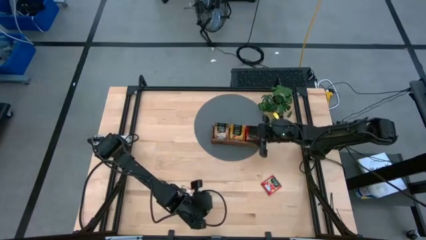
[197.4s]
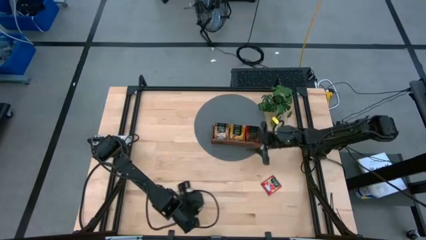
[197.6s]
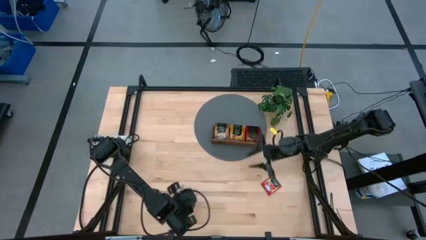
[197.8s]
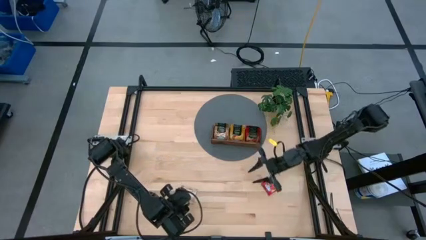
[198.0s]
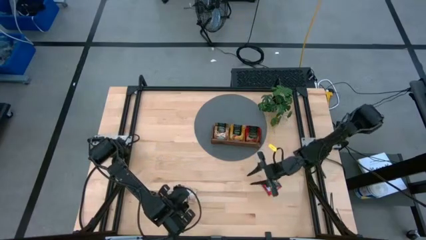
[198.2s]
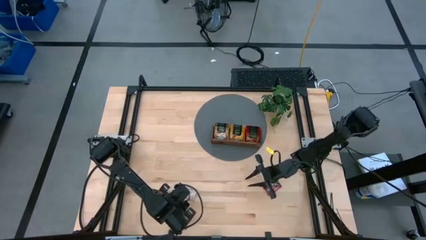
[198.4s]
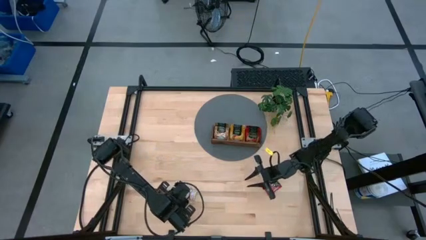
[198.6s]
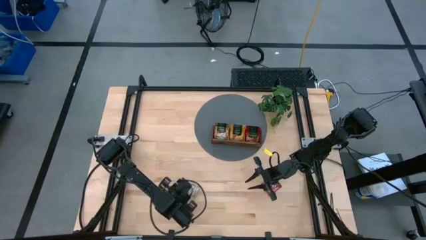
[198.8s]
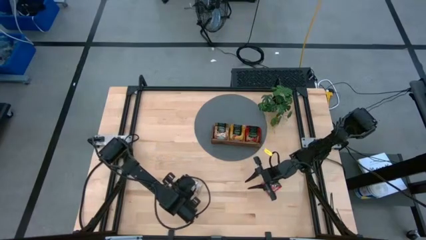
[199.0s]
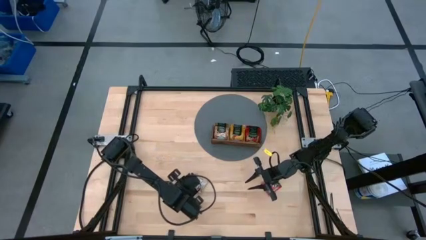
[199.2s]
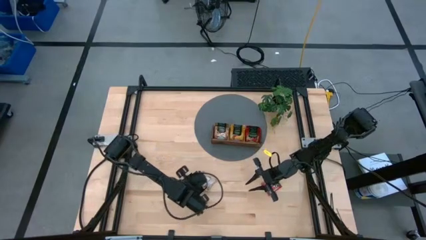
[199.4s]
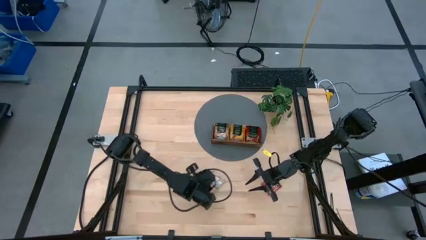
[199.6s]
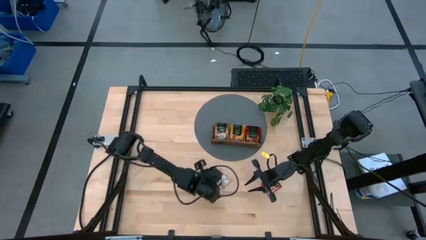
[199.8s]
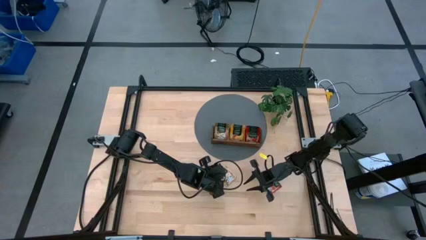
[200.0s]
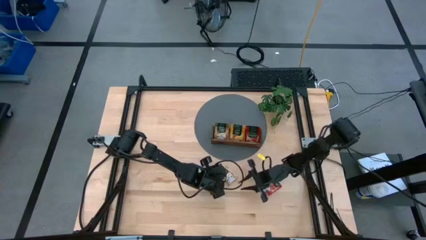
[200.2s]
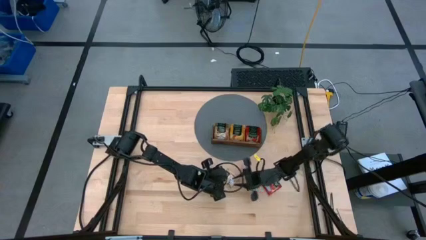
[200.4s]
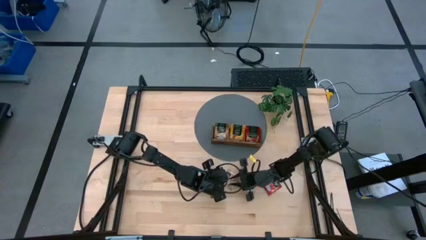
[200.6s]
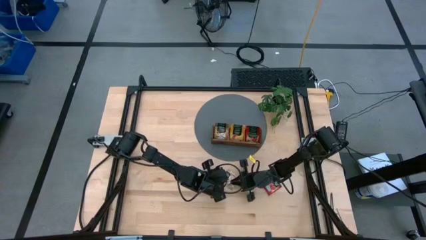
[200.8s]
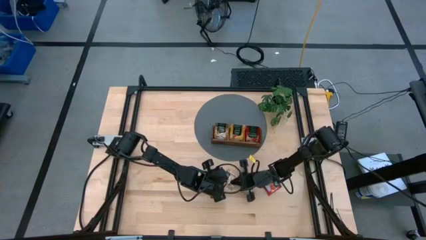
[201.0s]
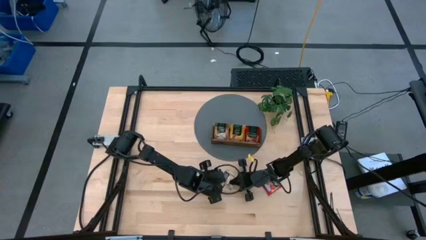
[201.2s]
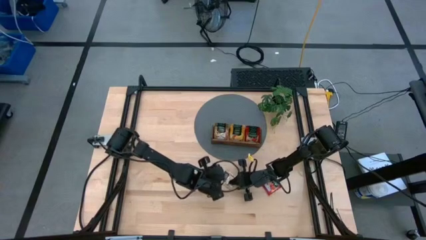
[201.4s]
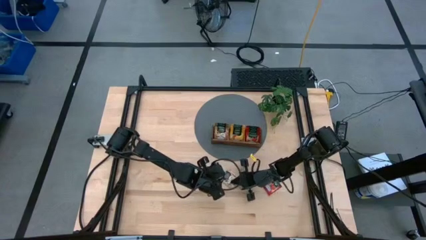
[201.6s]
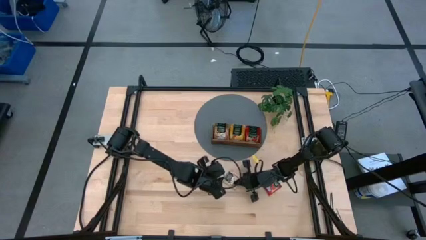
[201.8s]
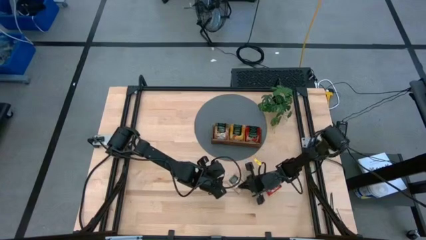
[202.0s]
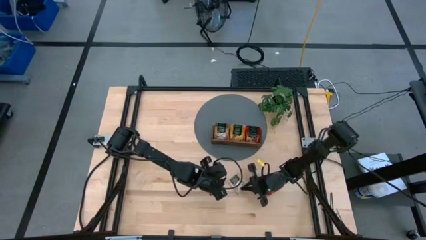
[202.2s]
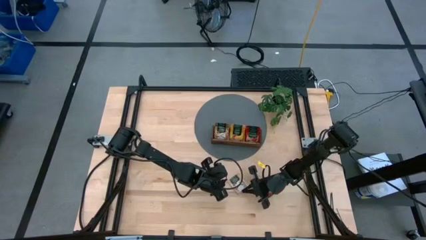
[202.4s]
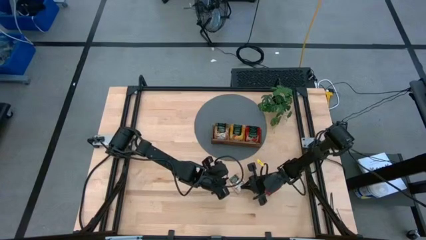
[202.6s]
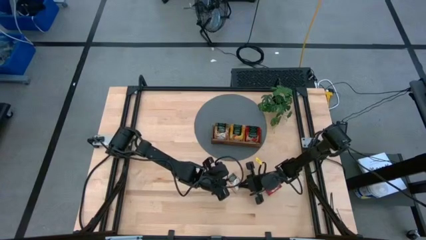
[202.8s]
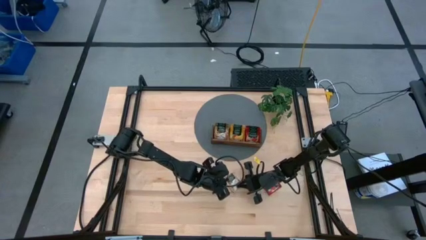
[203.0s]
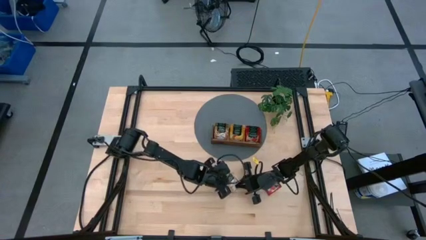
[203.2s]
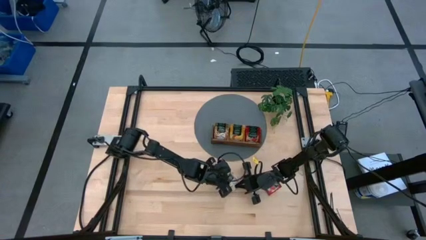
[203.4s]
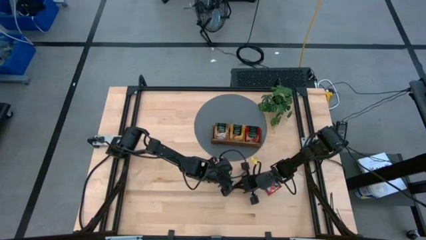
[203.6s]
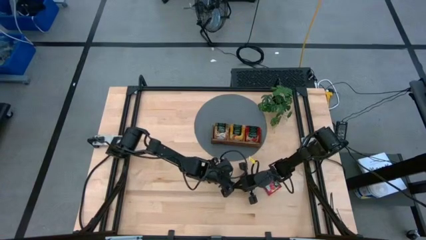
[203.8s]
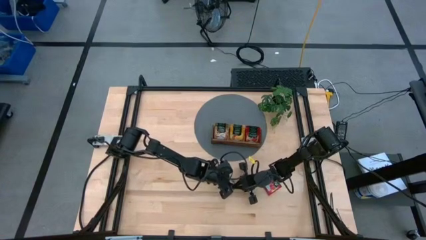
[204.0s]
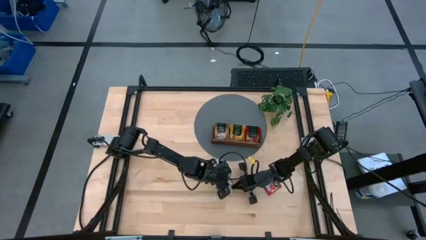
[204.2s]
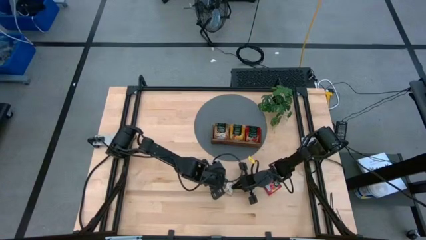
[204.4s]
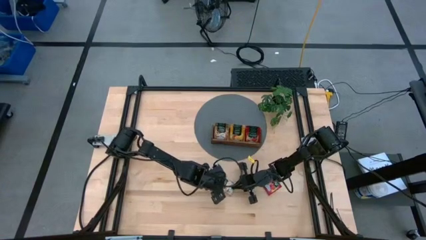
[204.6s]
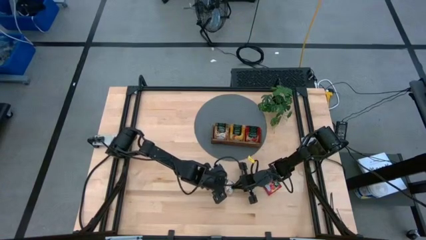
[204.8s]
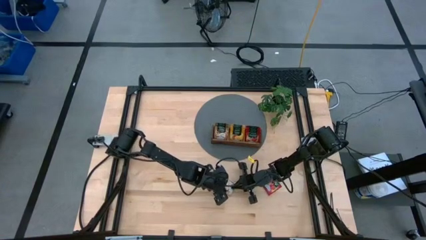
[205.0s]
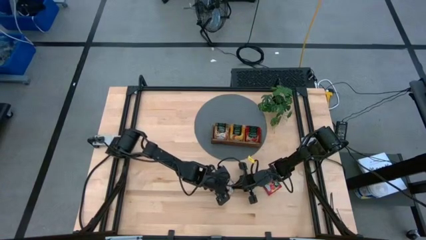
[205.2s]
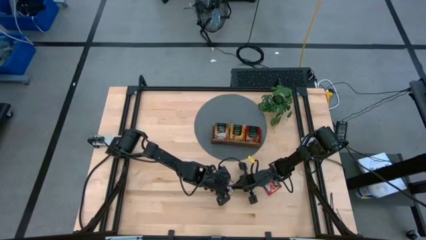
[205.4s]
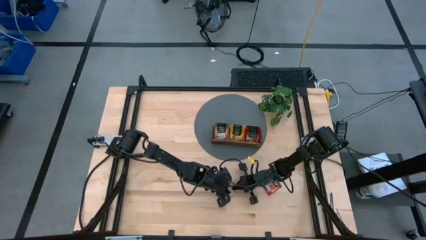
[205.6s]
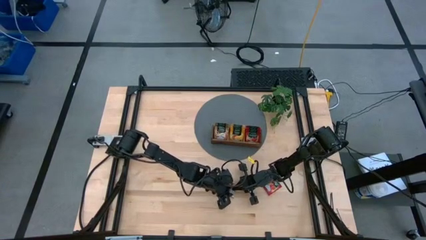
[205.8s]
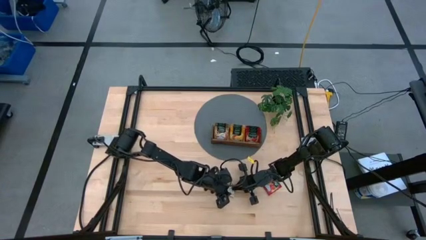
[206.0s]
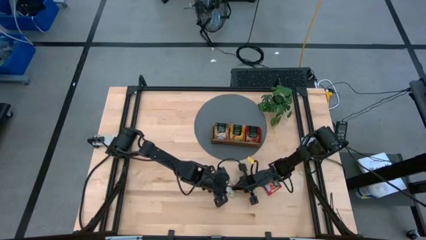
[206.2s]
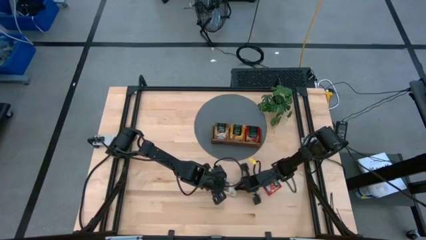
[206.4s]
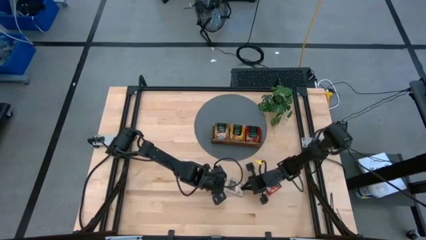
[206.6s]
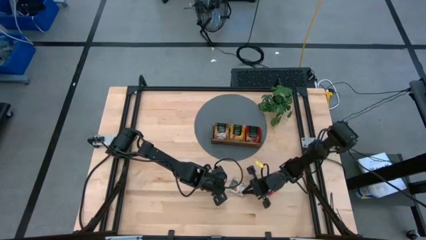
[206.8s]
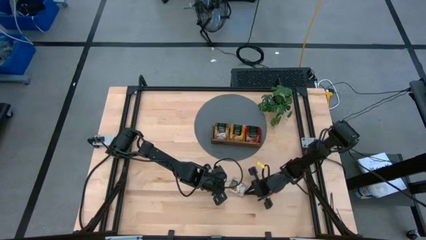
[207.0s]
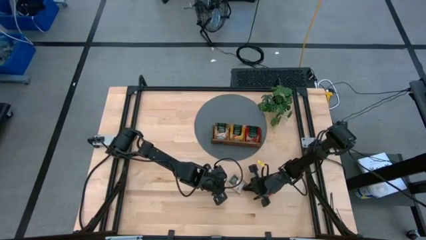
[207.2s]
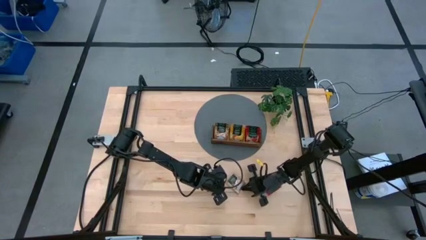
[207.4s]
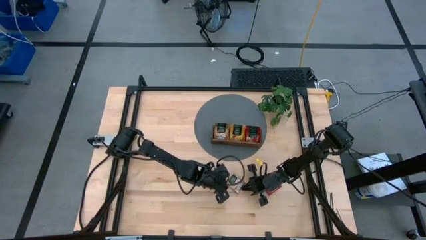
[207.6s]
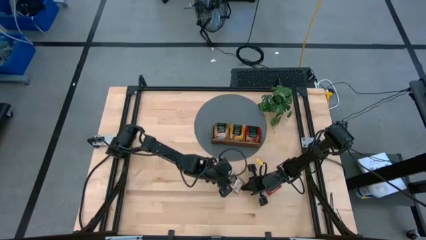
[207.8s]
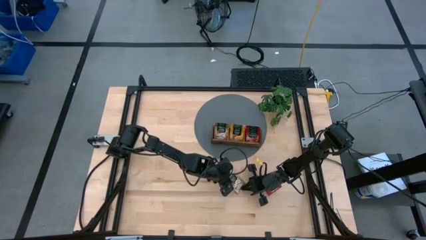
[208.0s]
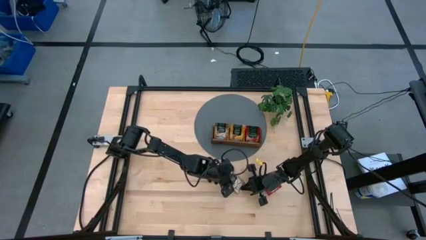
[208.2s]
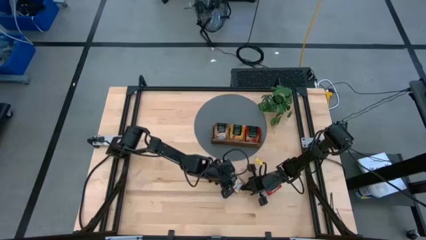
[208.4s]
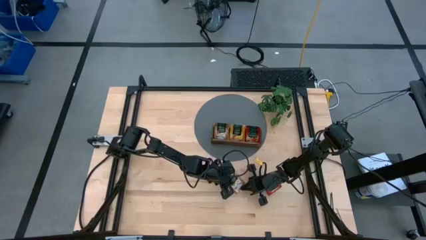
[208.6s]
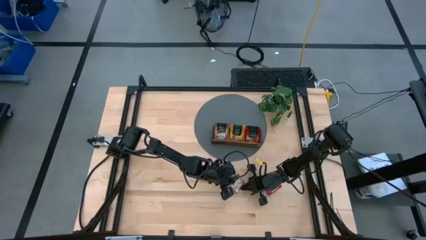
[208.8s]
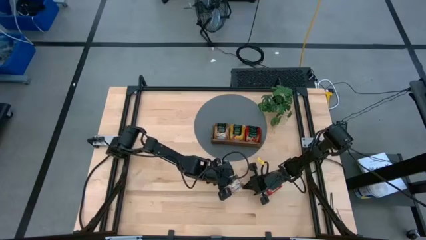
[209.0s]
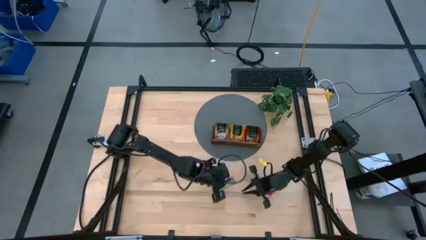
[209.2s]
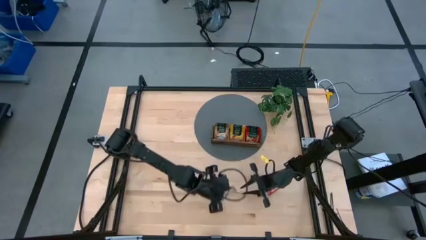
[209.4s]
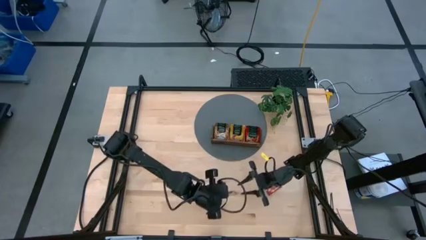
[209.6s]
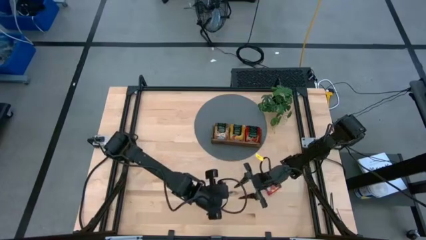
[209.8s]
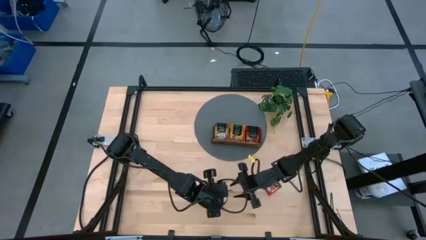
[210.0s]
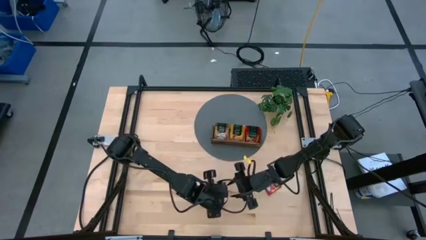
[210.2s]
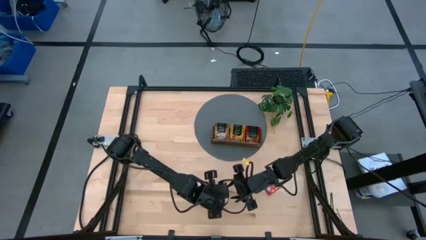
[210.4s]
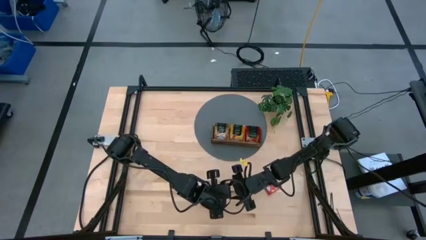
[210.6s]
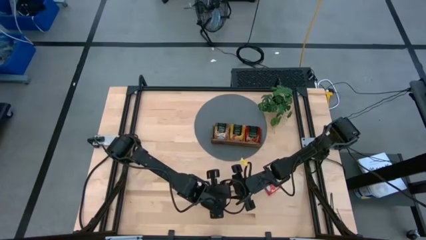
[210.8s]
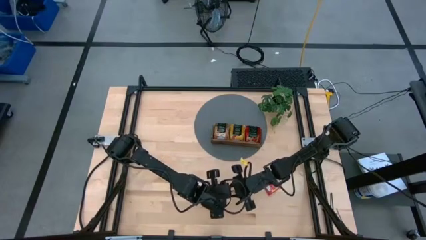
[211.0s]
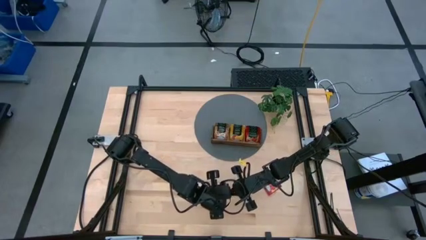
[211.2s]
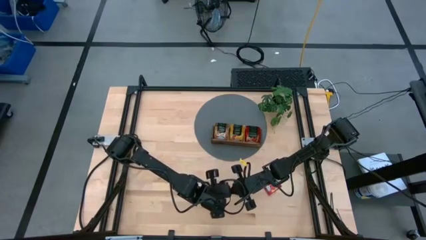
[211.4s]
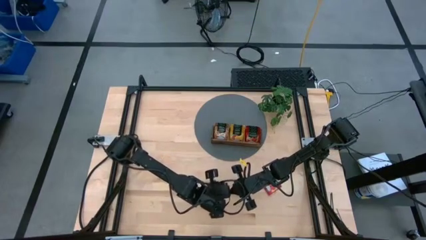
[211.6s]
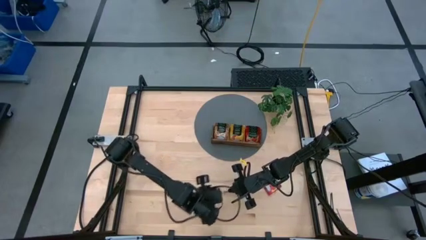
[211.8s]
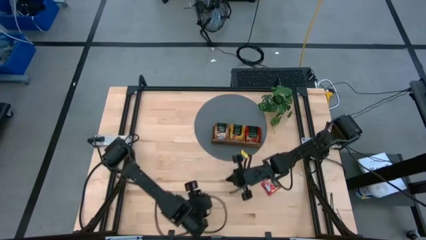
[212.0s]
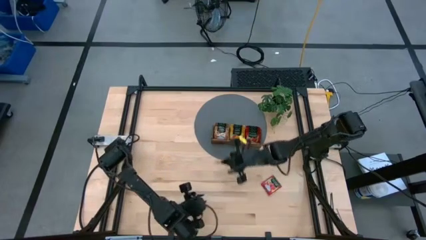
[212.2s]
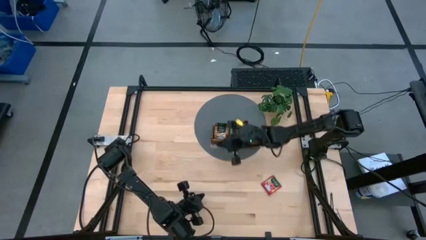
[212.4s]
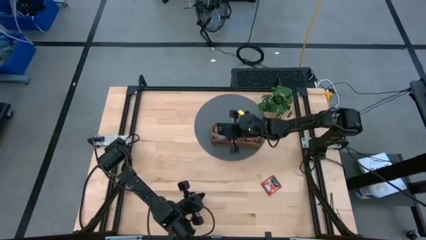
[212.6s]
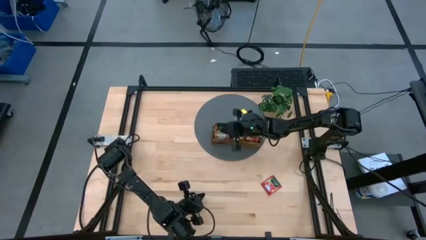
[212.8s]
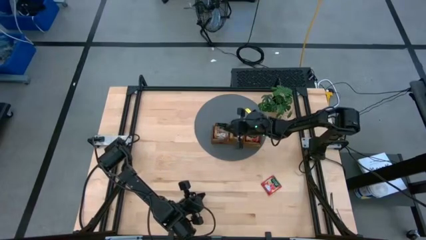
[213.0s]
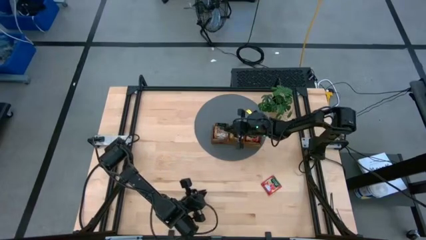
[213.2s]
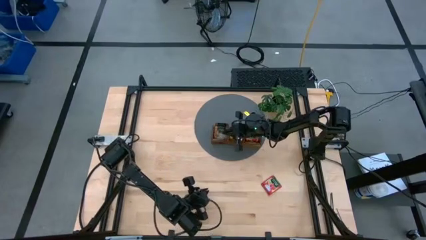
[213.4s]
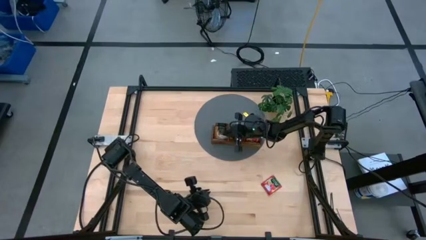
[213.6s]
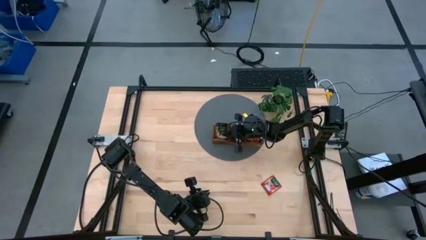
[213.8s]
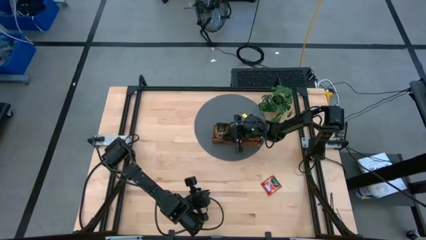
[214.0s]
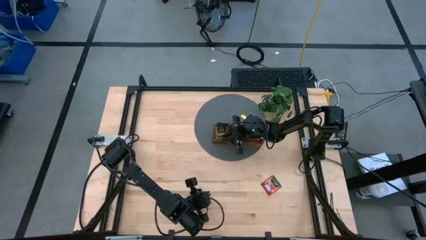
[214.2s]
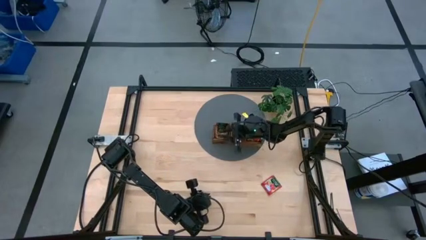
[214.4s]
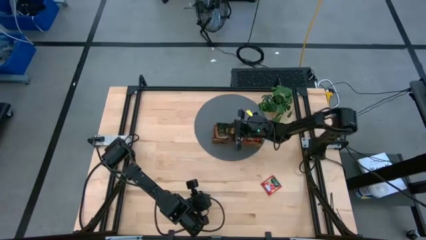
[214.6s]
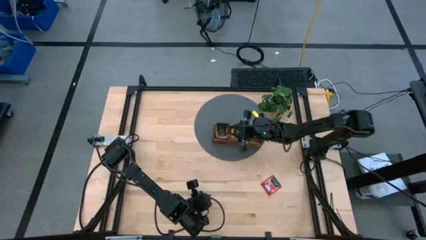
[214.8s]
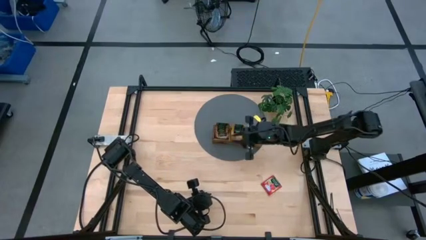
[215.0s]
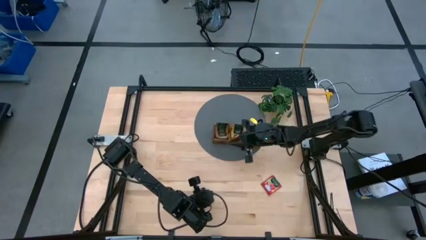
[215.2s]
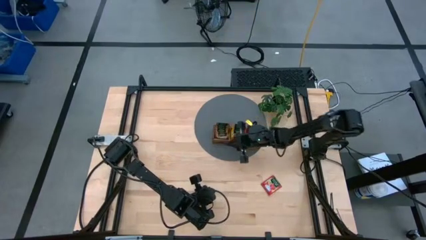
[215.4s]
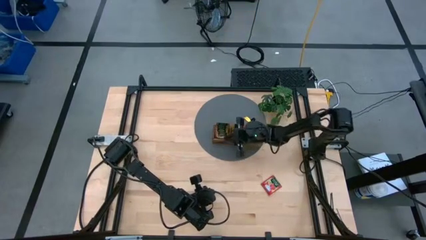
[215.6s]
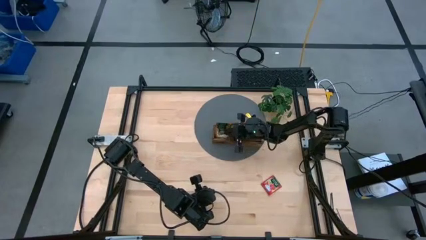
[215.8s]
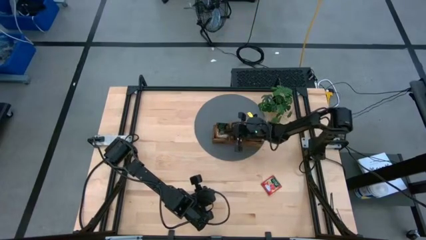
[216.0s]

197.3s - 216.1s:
Task: Pick & Place Tea
Put the brown tea bag into the left section of the wooden organizer
